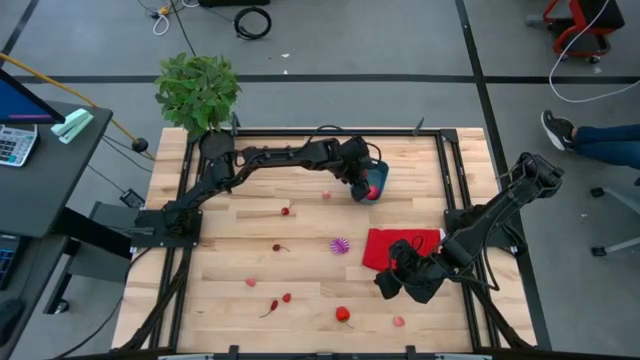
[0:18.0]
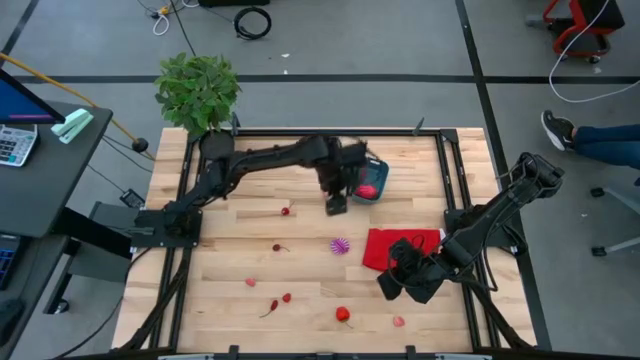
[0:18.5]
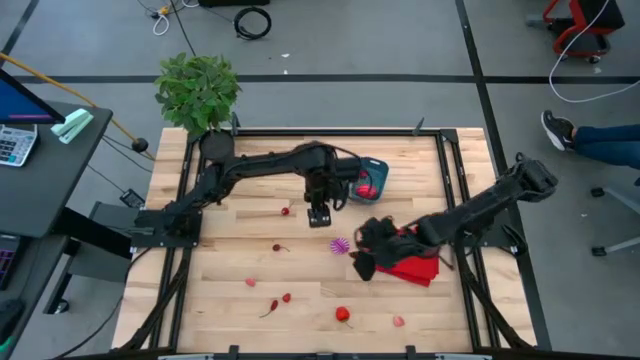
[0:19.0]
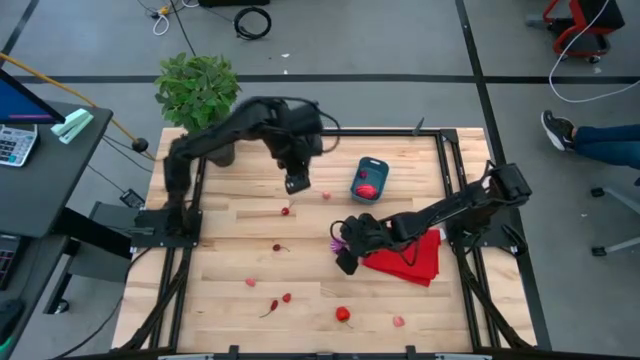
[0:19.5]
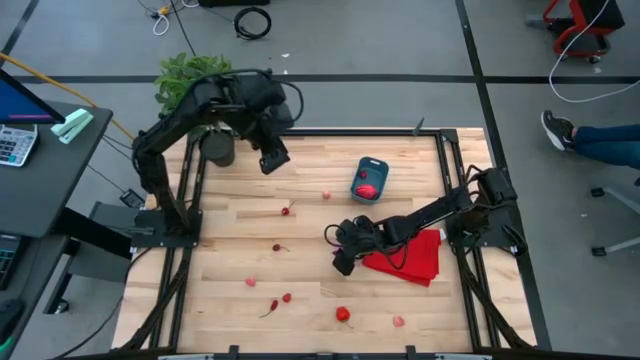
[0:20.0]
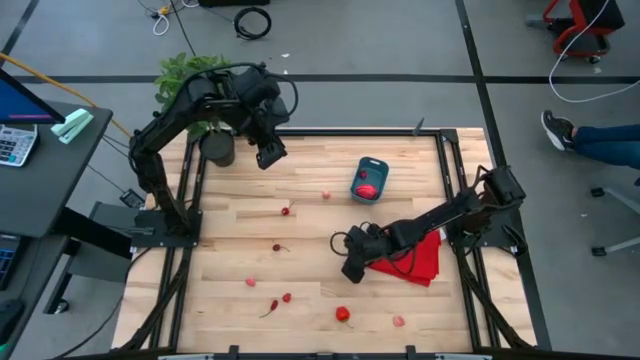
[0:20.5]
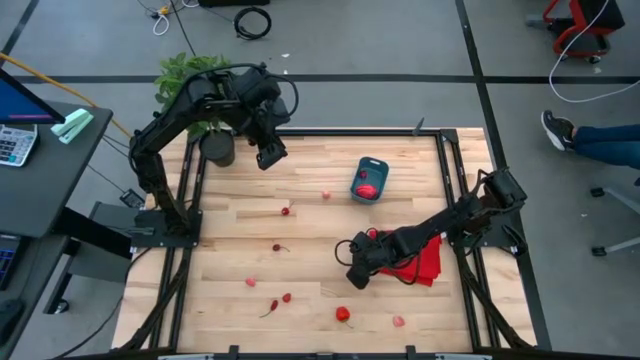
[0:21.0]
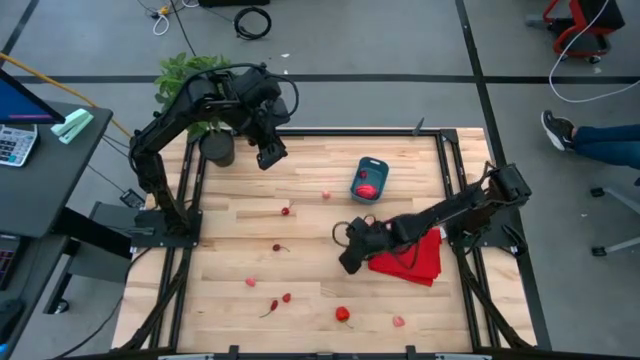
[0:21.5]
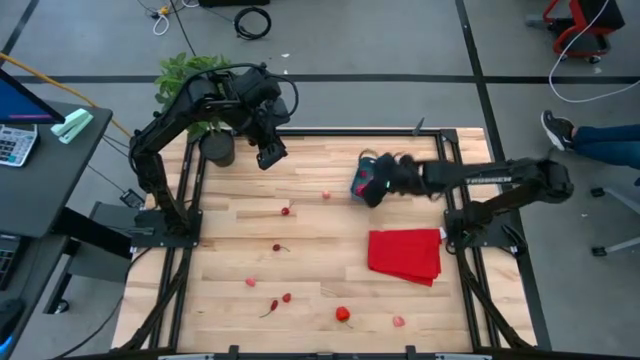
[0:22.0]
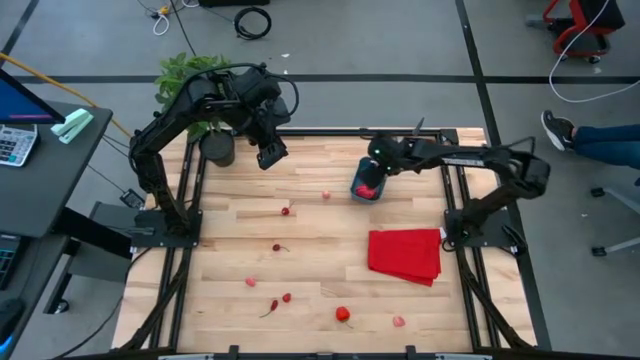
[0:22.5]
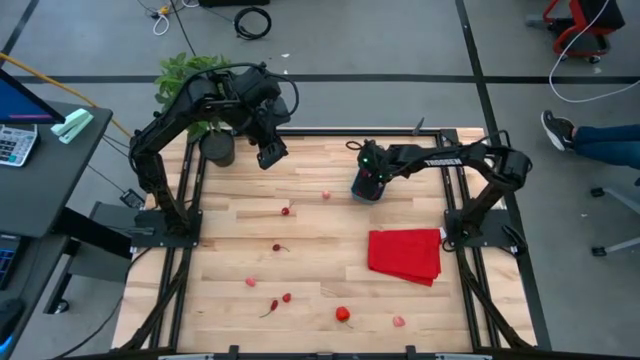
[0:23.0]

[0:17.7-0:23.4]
Task: Pick and placing Produce into tupperware
Put the onion into the bin

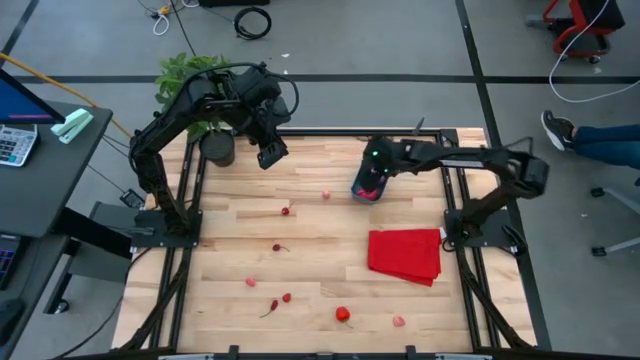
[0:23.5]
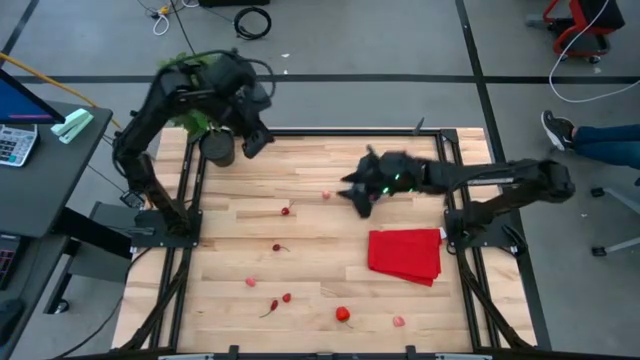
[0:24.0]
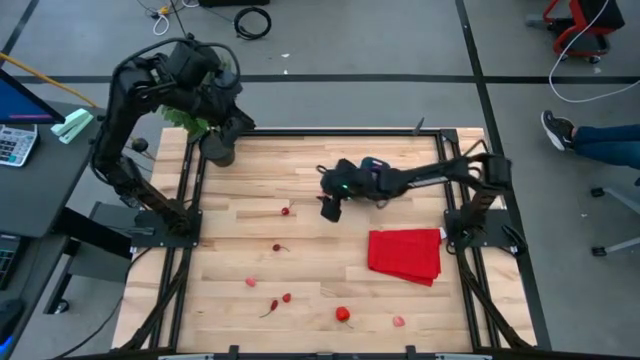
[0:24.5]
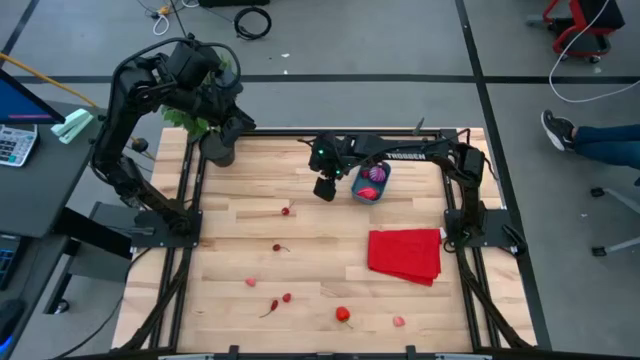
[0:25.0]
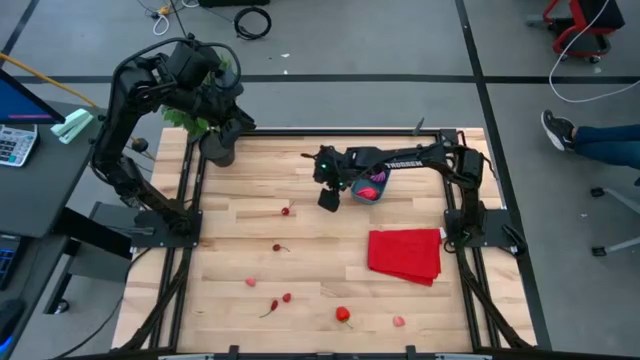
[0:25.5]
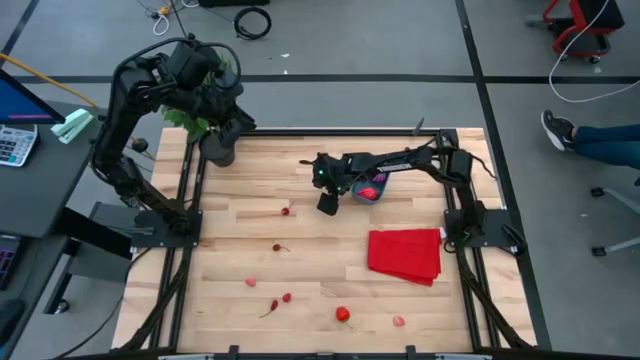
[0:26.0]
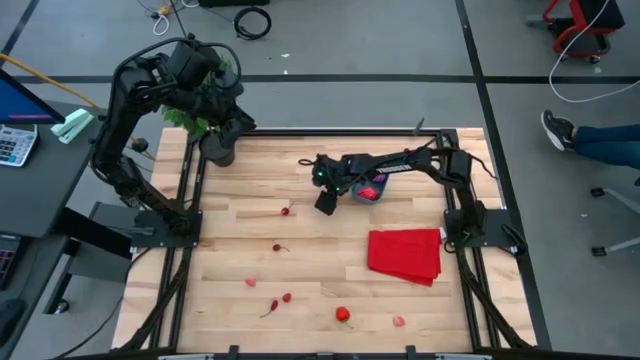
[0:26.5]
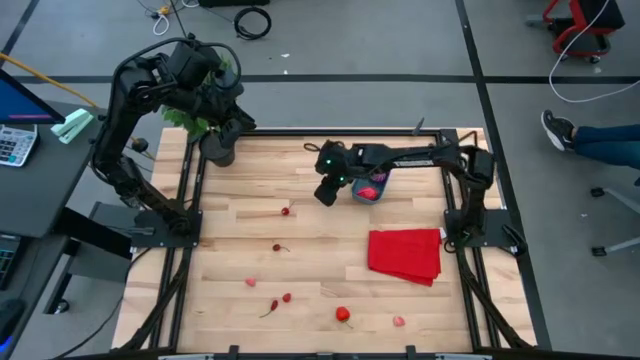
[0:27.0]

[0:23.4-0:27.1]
Put the peach into the bin

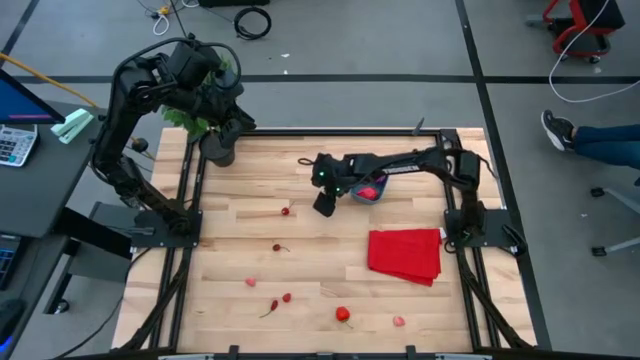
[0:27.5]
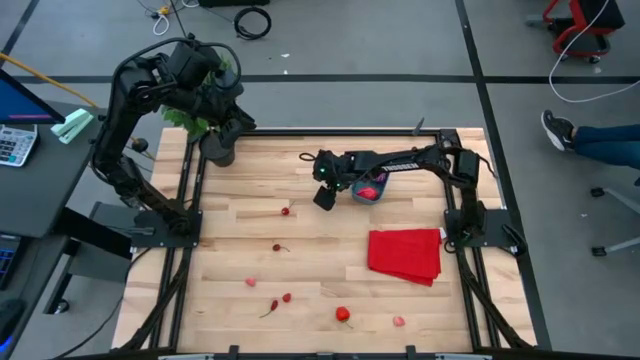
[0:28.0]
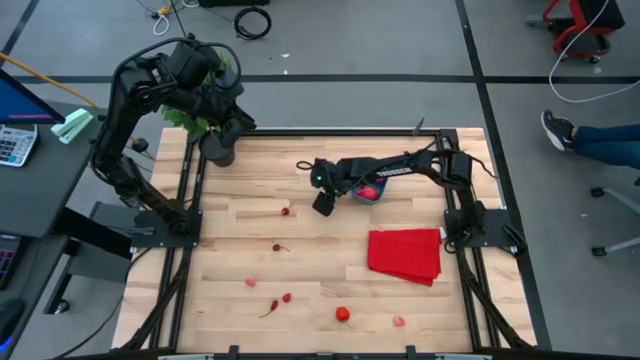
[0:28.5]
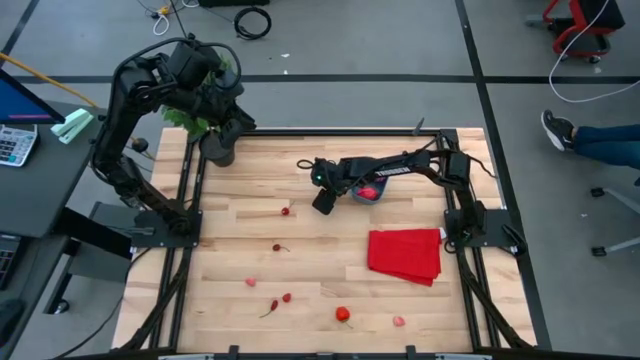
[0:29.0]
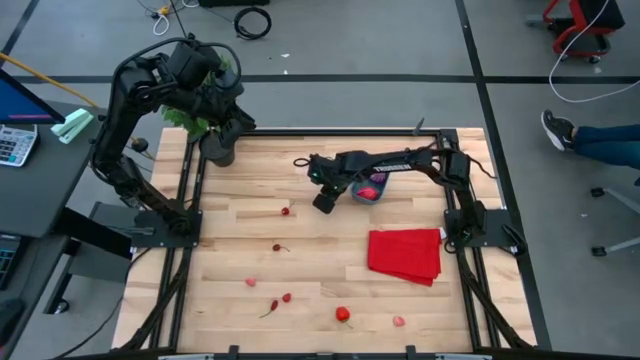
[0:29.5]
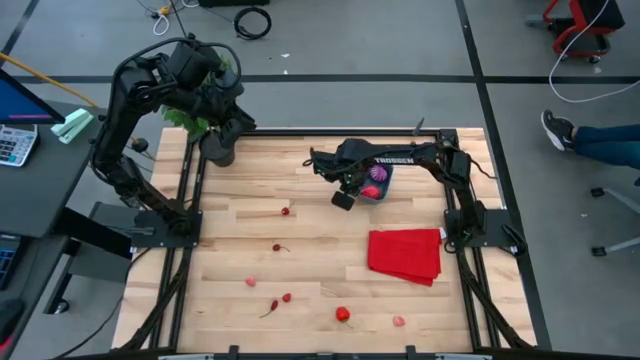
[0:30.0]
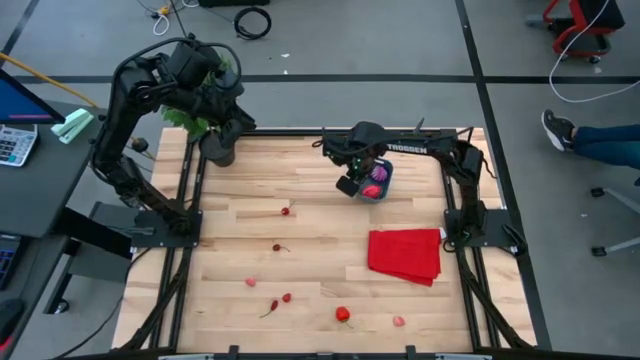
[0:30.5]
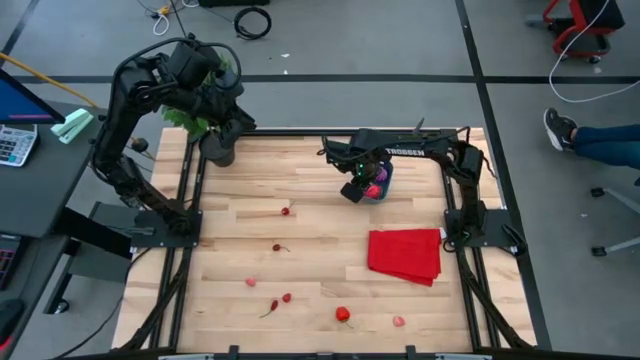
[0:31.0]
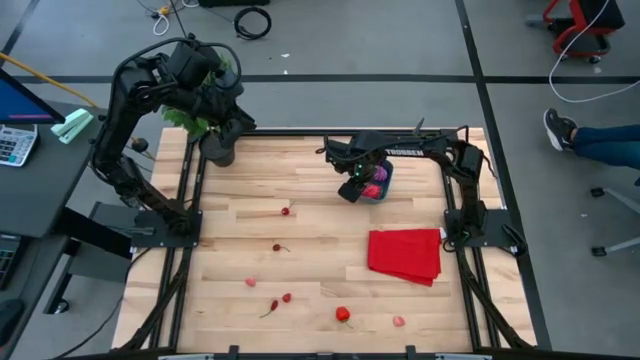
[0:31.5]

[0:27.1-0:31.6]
Put the peach into the bin

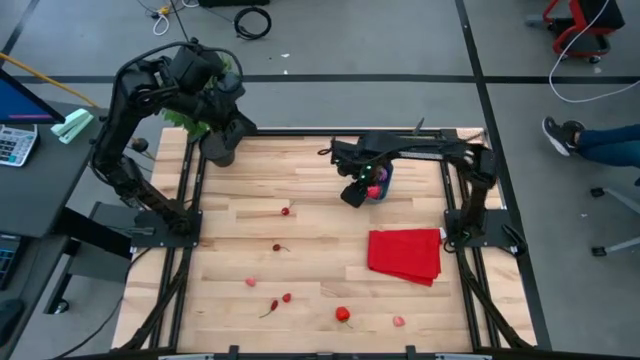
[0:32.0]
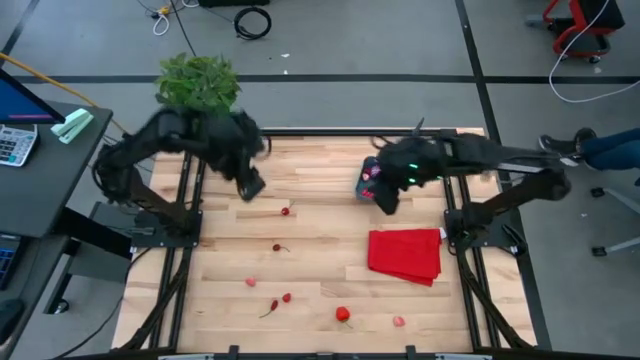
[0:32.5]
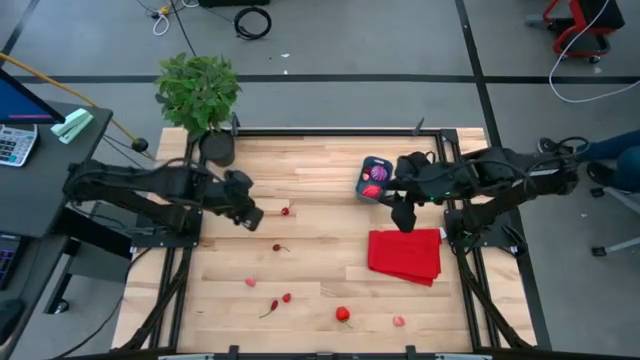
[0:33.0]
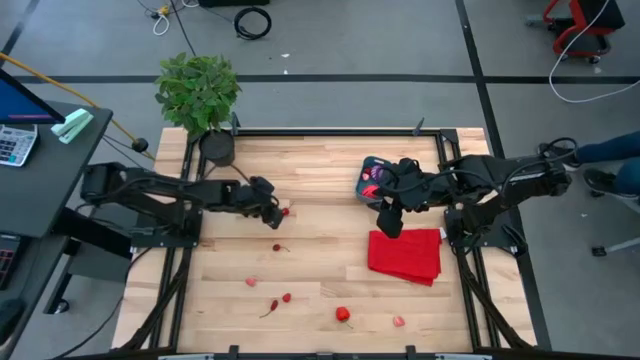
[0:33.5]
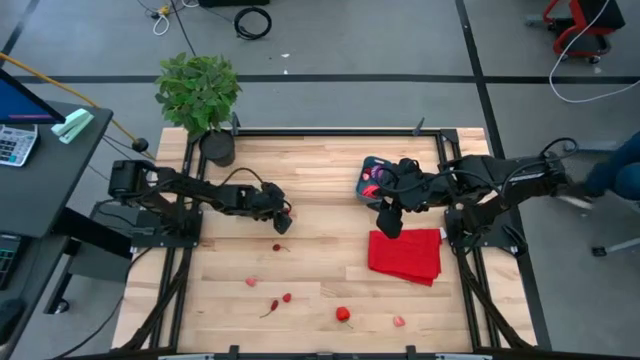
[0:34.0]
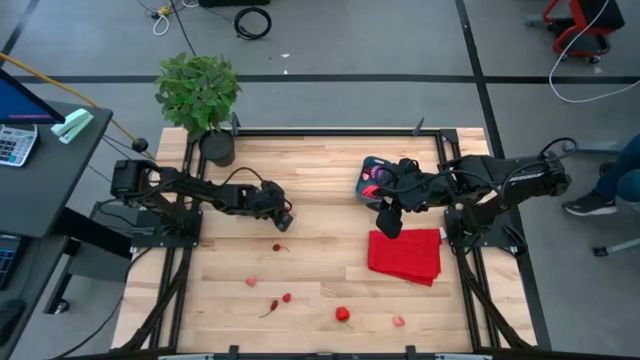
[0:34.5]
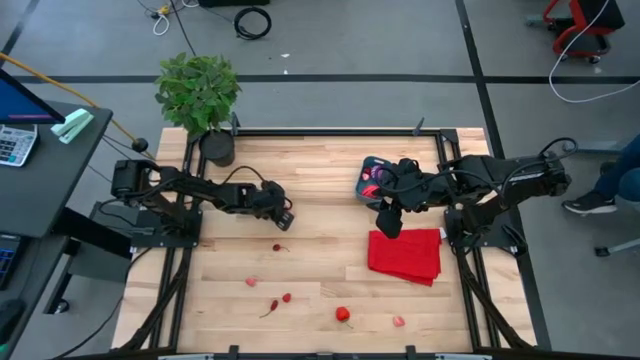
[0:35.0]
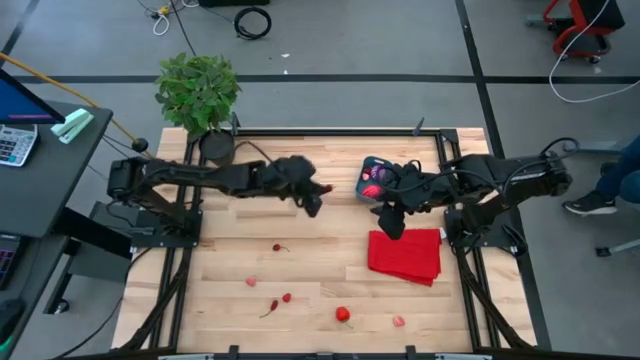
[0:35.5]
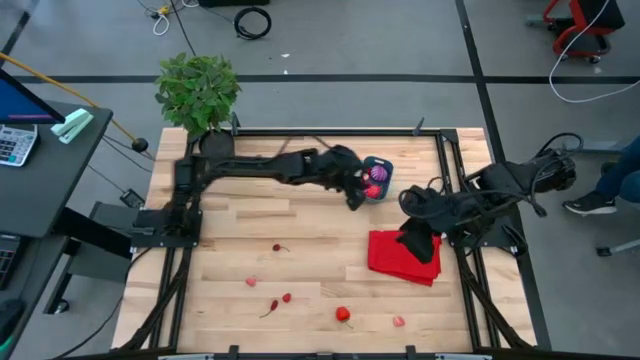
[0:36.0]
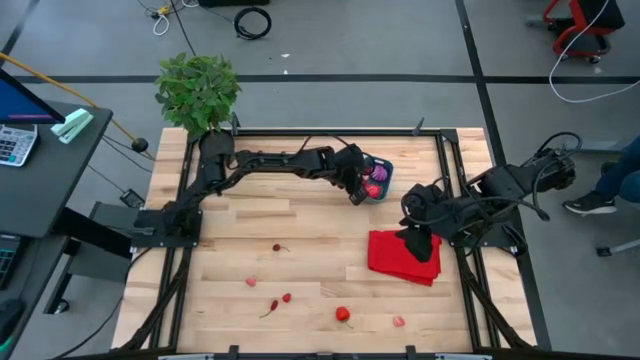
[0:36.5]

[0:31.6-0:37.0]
Put the berry into the bin

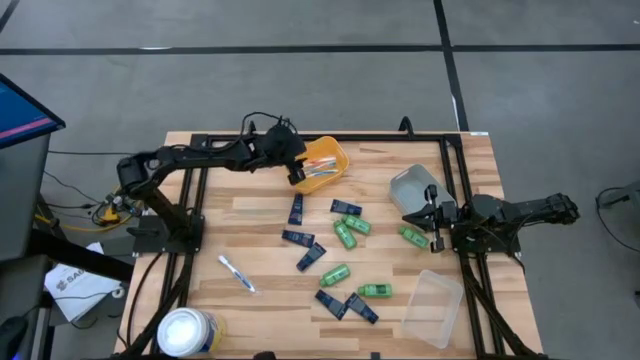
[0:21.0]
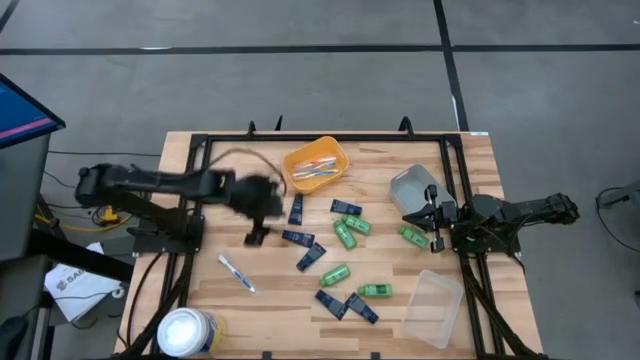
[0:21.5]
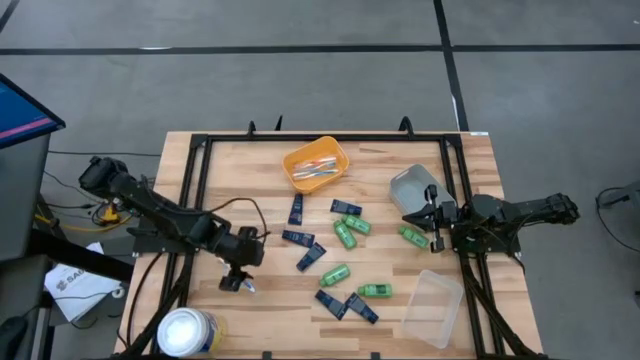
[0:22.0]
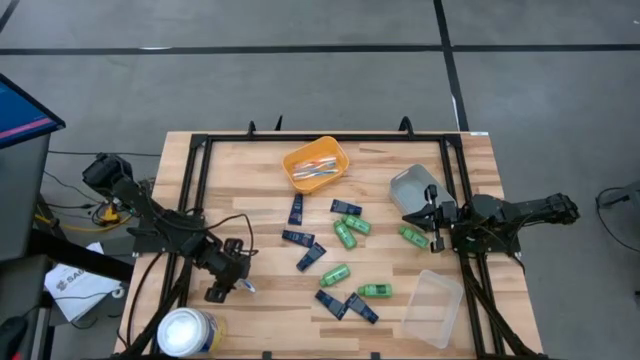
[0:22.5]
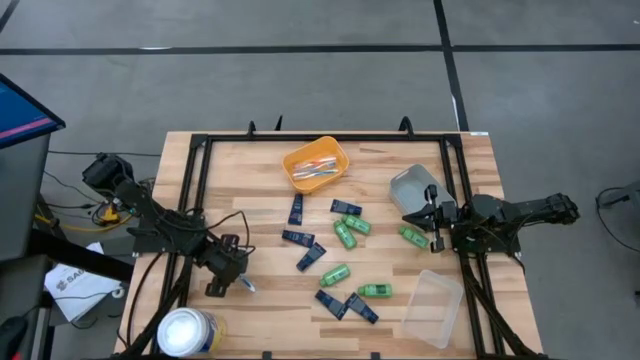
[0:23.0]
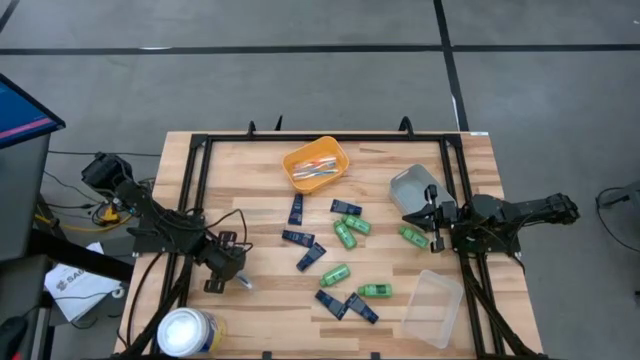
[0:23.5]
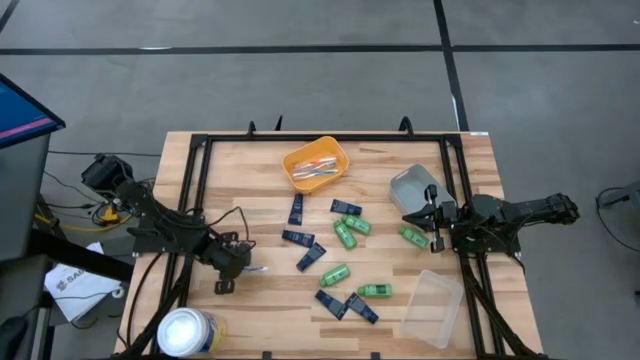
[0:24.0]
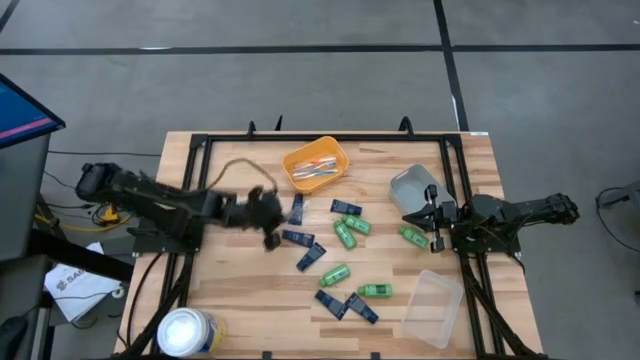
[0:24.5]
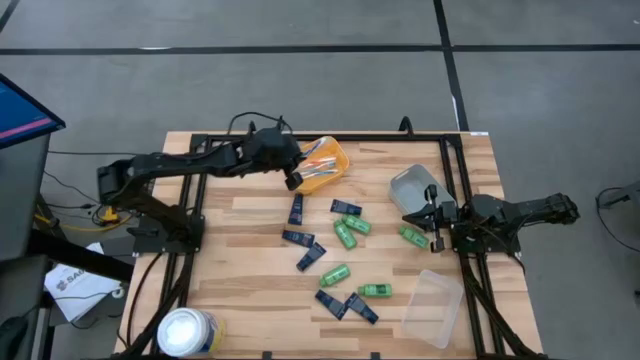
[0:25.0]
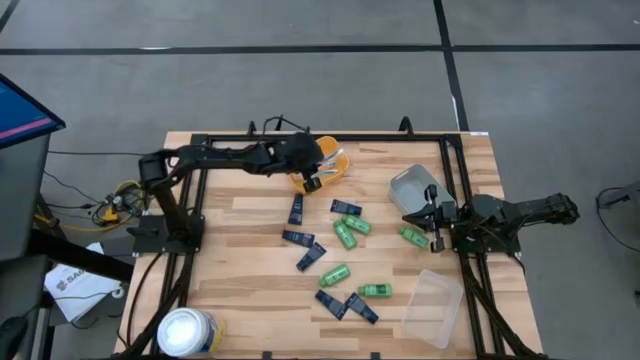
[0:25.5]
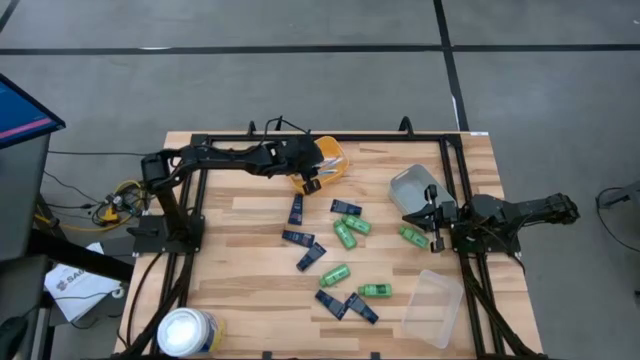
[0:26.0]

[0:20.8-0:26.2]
Task: Pick & Place Travel size toiletries
Put the blue toothbrush into the yellow bin
